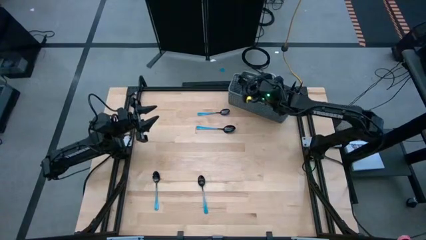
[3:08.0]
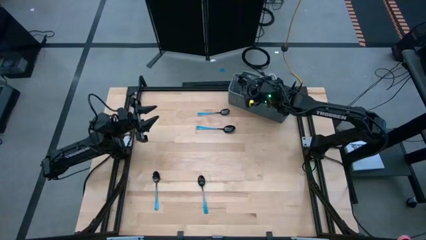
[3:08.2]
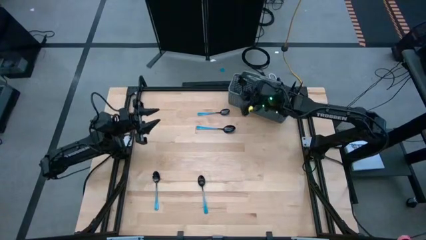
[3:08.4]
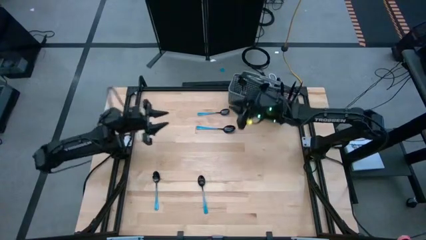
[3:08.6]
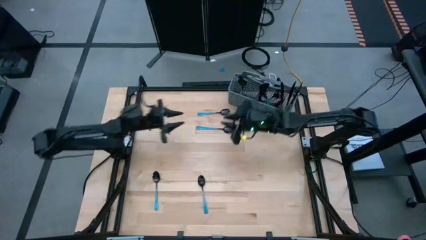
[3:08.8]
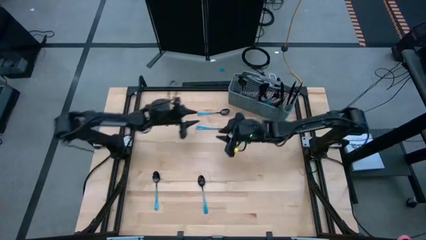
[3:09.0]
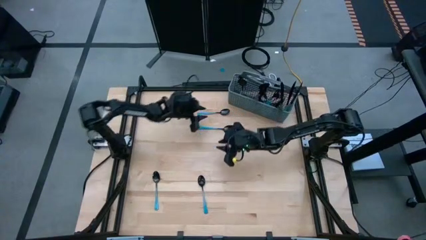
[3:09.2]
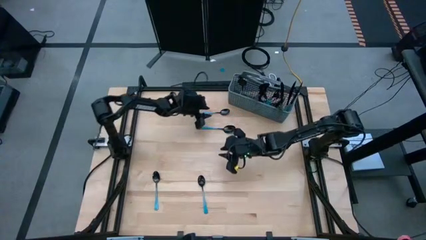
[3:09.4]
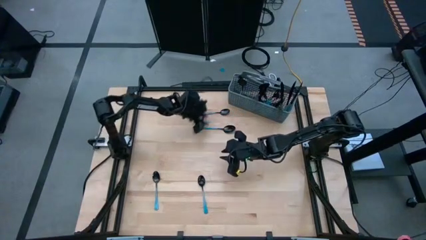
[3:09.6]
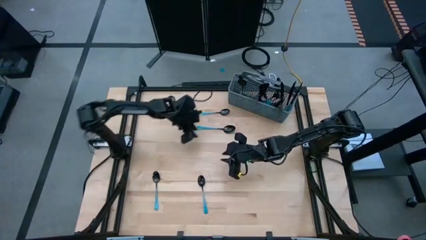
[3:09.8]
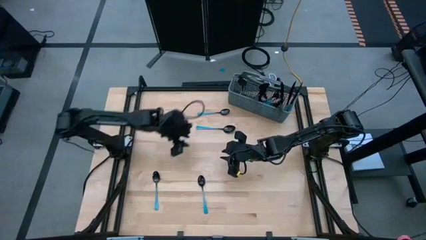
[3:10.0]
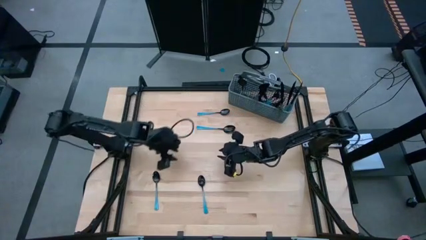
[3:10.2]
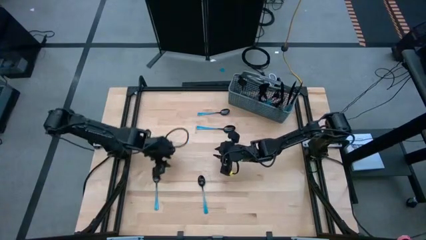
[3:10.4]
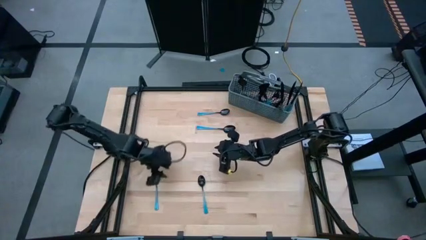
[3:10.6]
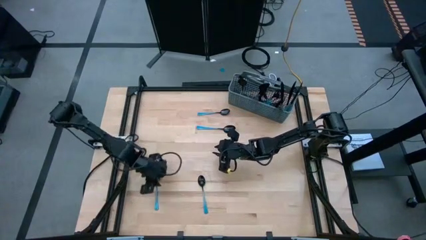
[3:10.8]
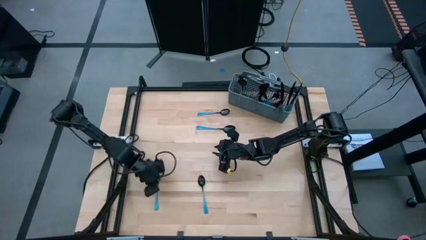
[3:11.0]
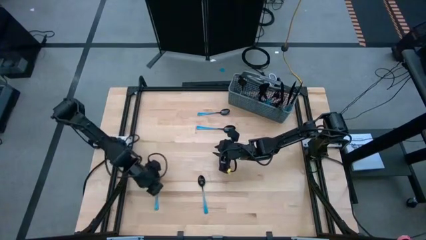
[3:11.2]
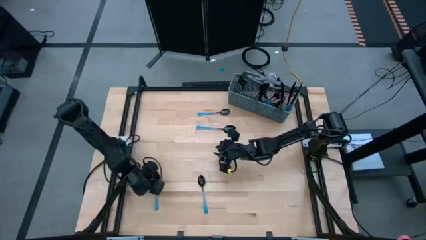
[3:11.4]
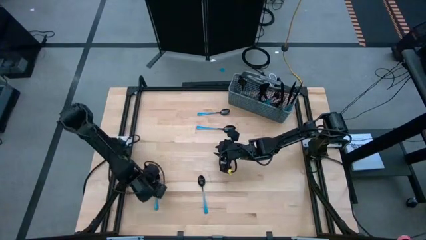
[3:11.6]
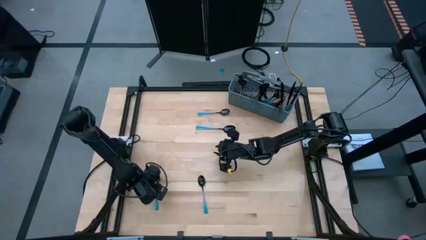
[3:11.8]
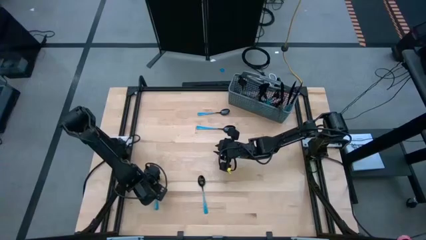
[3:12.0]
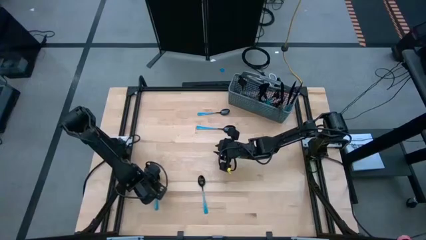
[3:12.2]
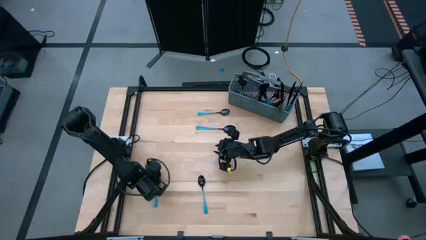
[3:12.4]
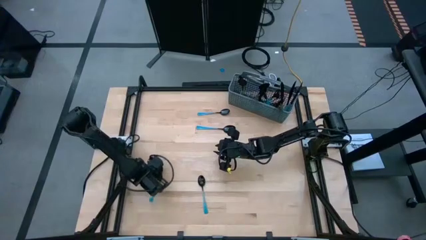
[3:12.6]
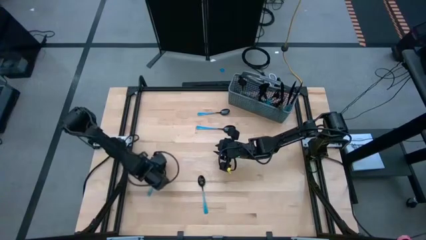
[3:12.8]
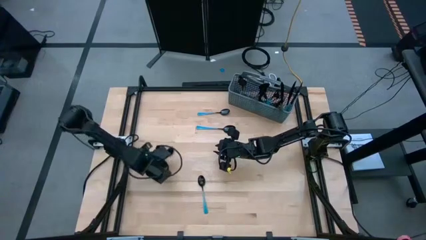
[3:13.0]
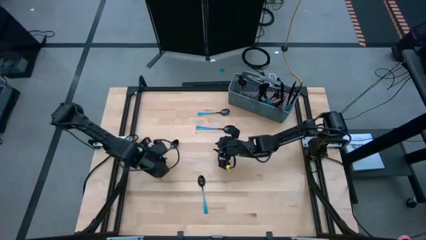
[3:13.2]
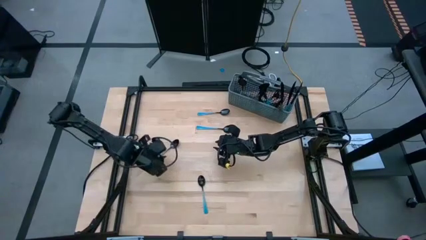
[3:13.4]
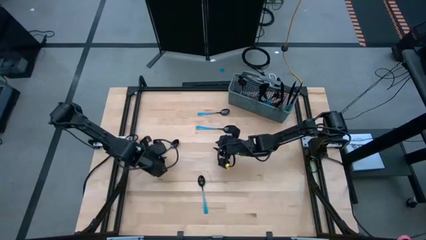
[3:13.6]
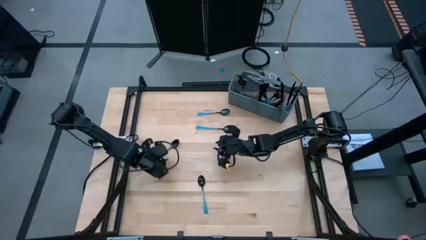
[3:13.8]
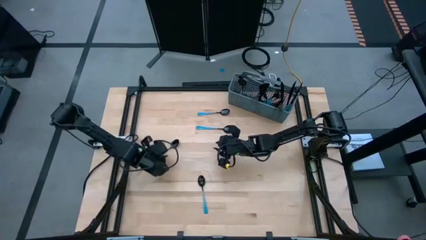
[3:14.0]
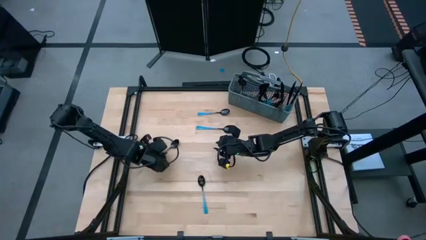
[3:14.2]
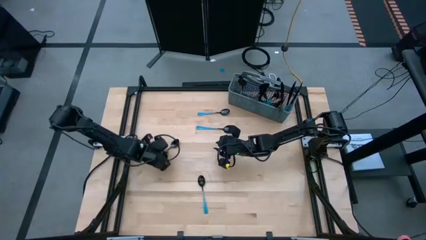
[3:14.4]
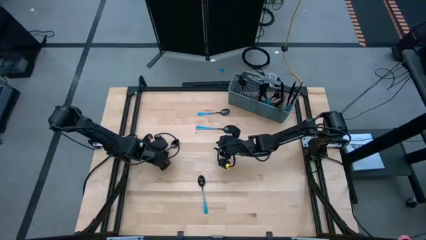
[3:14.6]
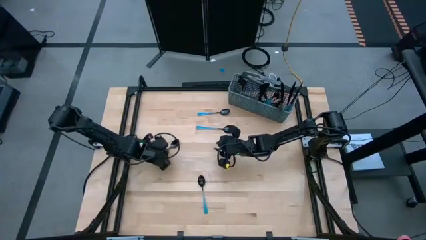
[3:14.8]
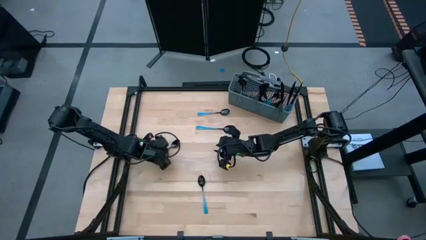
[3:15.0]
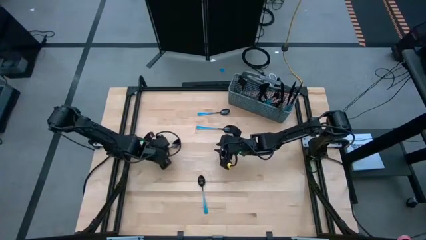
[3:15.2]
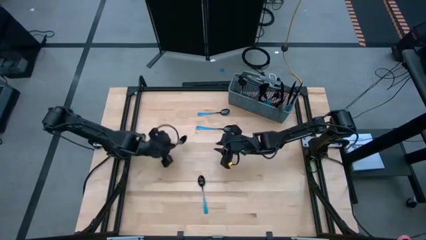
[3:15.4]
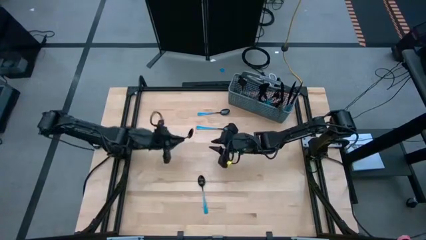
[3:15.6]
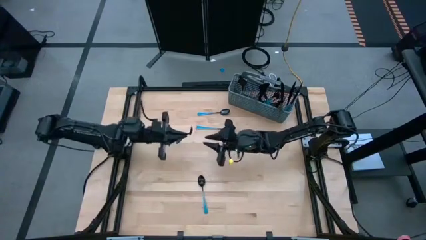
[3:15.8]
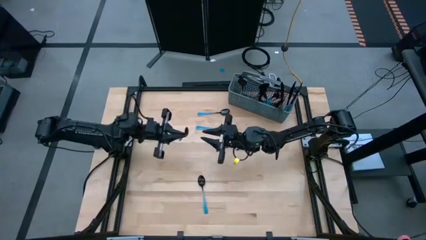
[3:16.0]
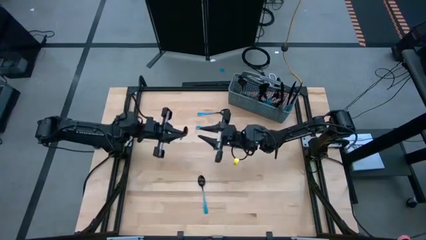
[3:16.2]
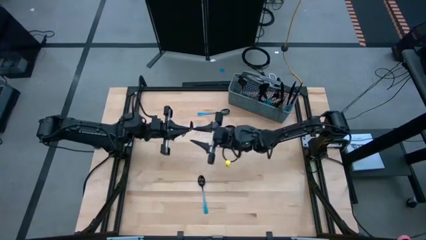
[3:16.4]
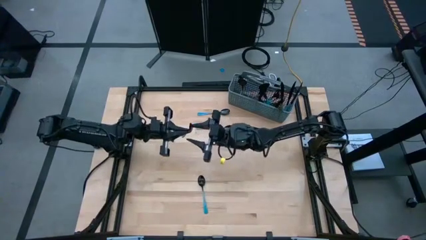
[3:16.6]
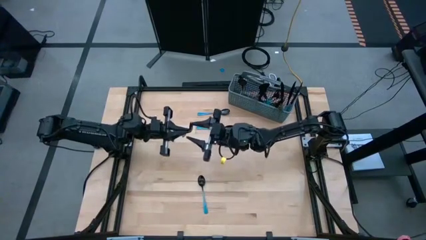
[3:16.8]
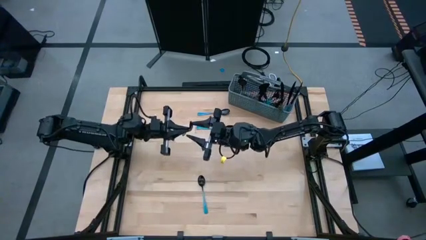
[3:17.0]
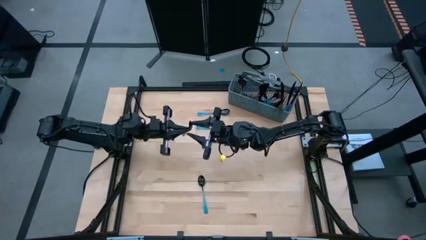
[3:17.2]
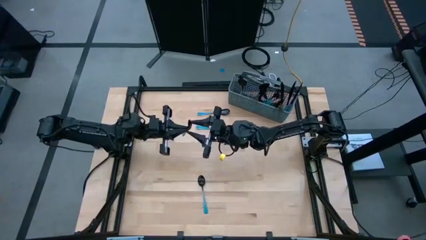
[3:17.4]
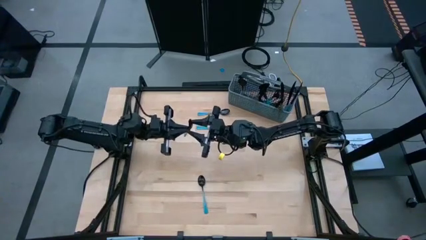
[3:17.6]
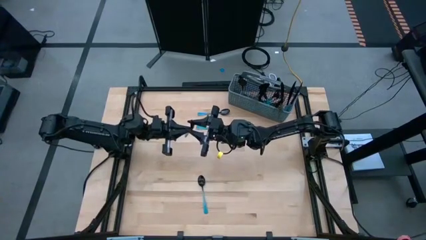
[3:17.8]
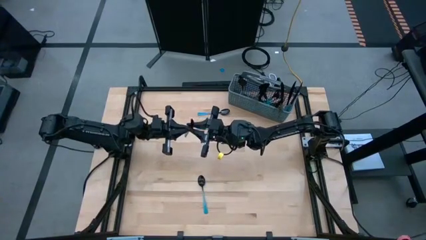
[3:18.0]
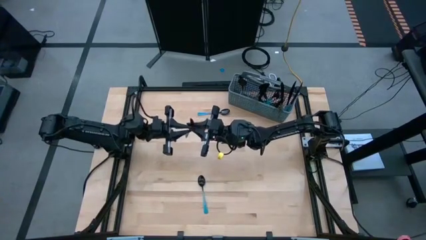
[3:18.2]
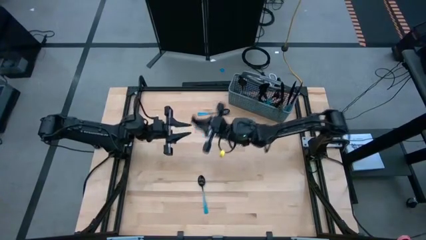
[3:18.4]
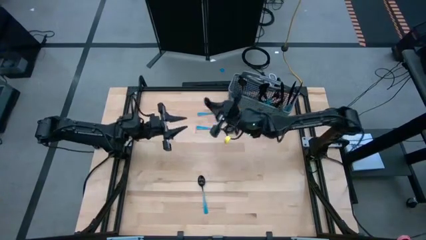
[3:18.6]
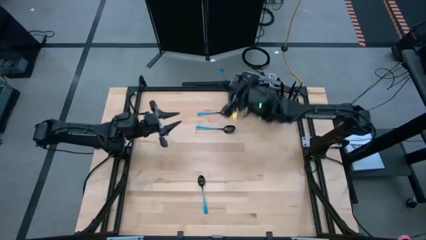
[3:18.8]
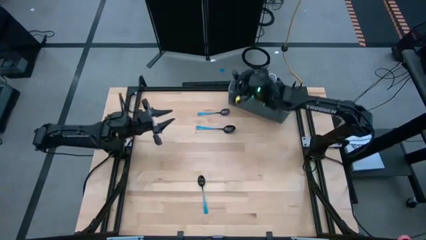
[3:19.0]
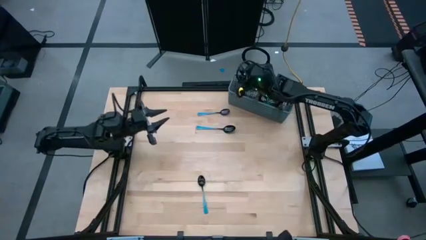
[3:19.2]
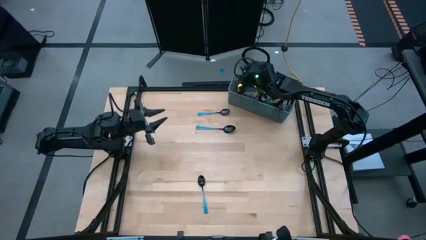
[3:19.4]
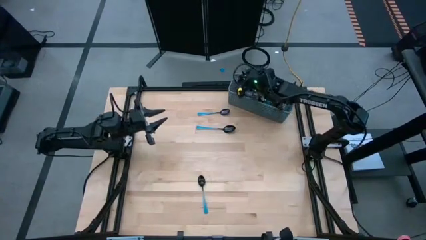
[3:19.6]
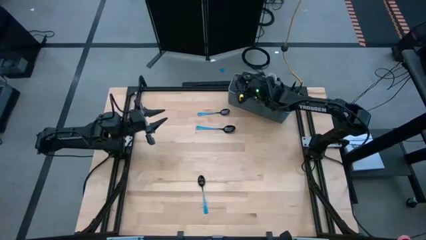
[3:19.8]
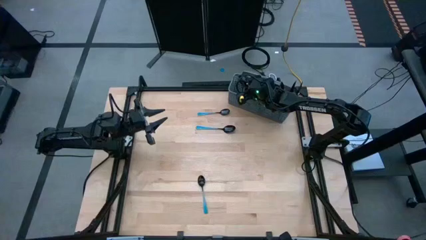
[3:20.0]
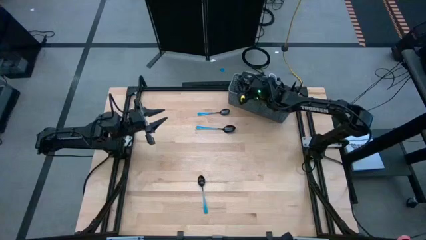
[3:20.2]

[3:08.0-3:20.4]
Task: Sort silverware
Put the blue spoon into the left of the blue utensil organizer

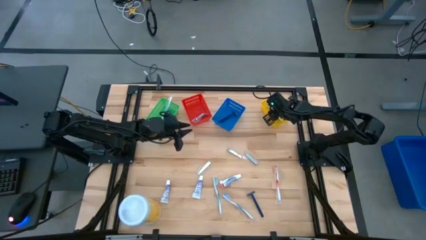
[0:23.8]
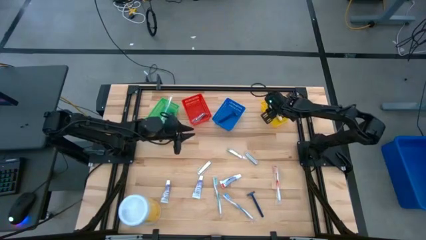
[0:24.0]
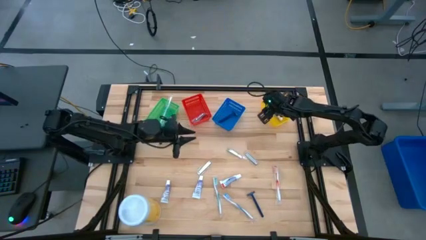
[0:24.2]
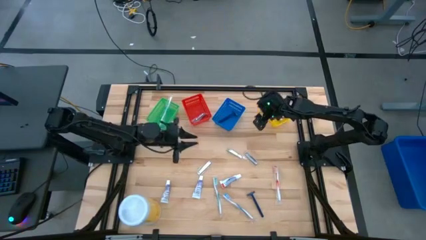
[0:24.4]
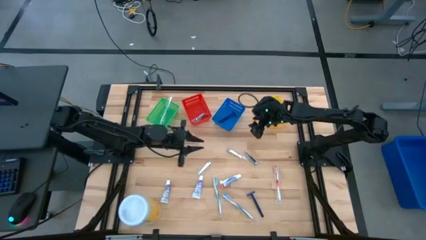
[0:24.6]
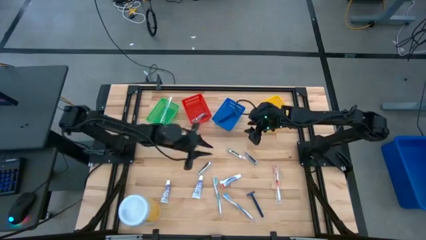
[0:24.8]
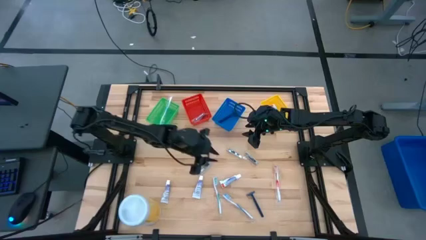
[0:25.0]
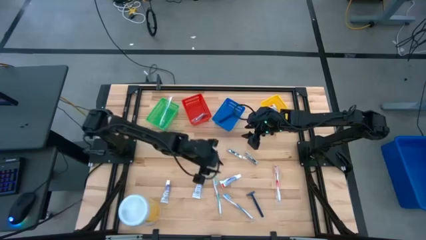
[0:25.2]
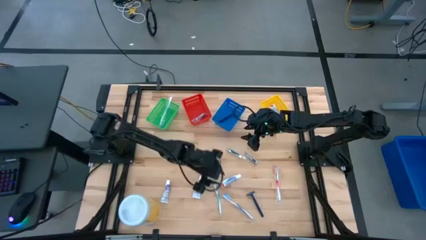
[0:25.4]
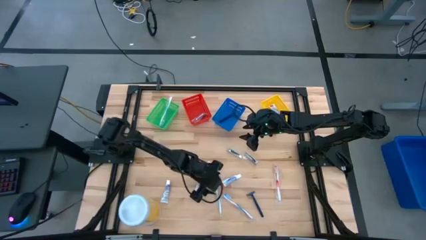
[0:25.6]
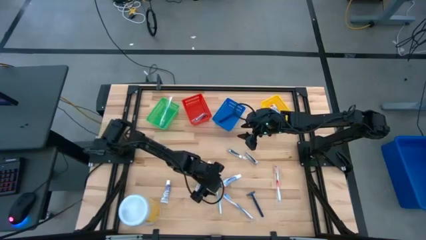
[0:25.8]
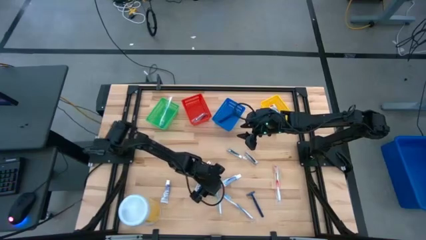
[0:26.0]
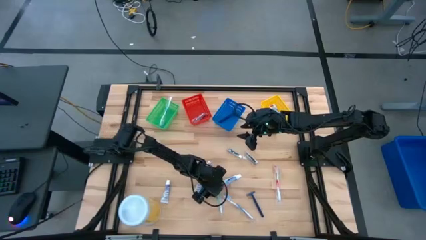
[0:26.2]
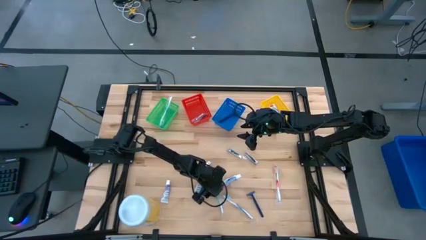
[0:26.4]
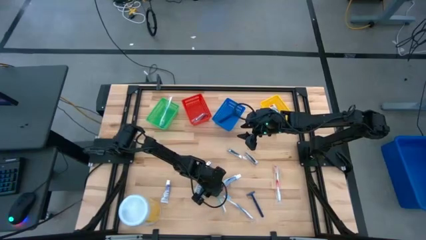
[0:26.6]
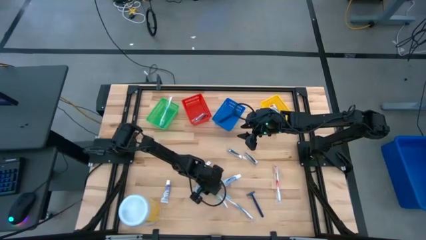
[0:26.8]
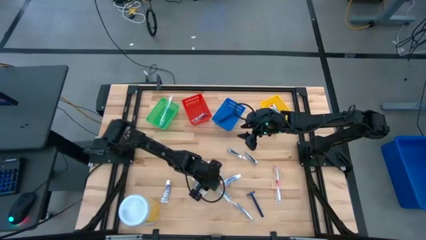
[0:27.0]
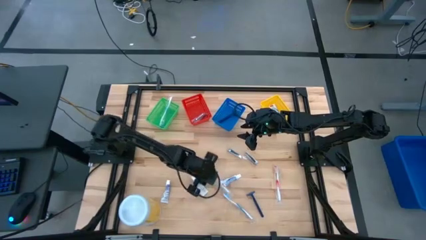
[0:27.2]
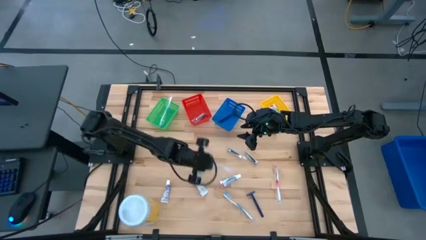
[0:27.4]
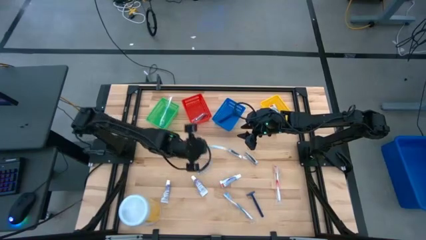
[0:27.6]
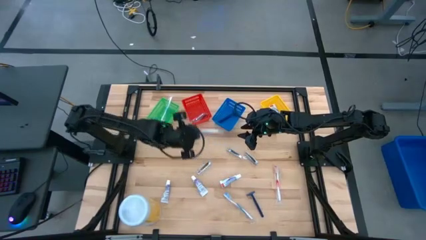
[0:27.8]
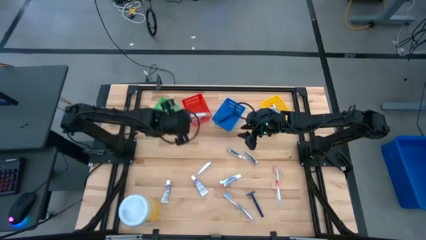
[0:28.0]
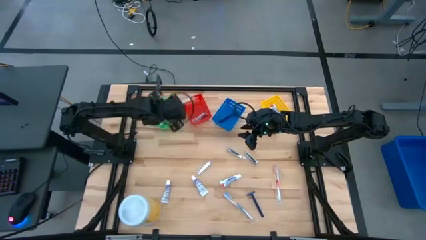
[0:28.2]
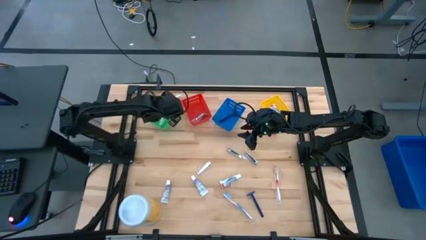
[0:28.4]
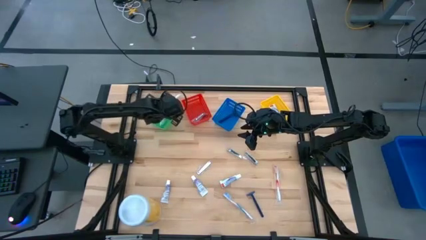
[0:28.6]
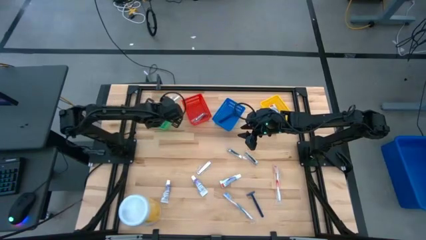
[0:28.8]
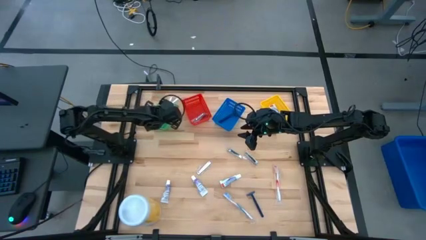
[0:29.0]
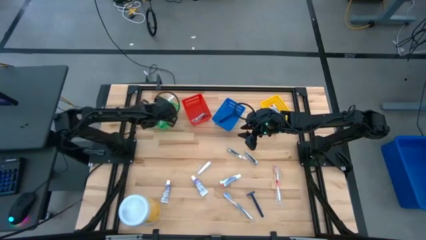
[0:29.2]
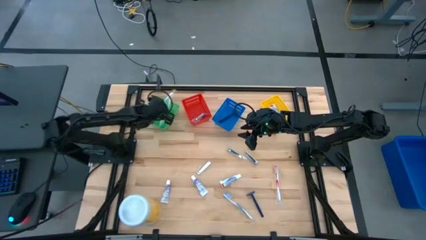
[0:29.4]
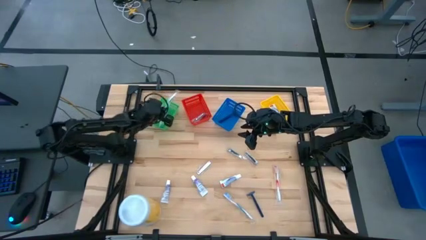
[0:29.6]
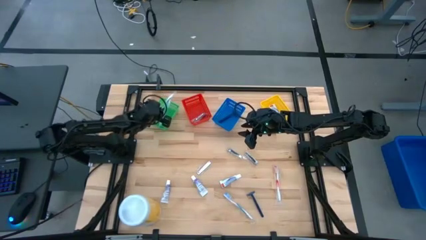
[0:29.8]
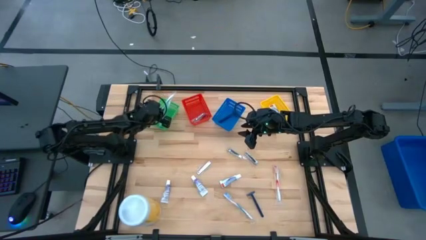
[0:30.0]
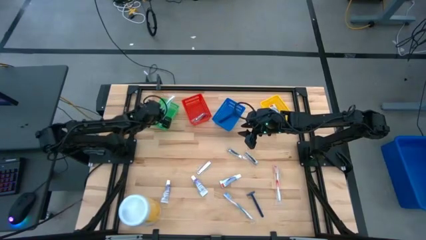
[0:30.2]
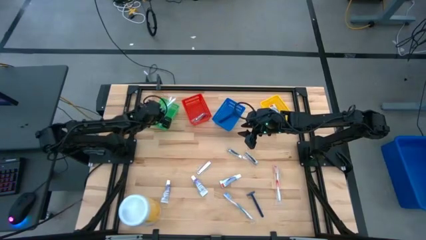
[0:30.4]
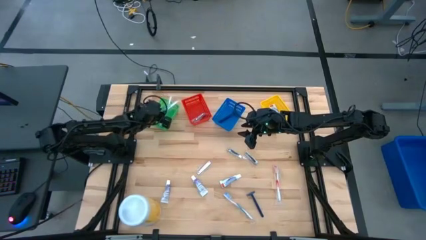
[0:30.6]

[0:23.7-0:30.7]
Task: Pick & Place Travel size toiletries
Put the green toothbrush into the green basket
